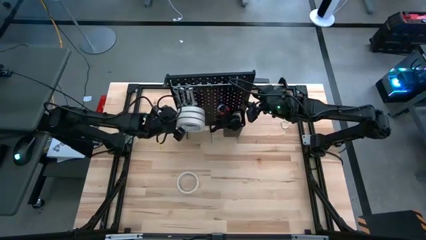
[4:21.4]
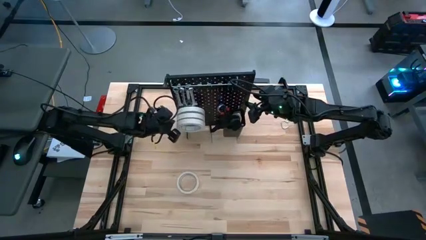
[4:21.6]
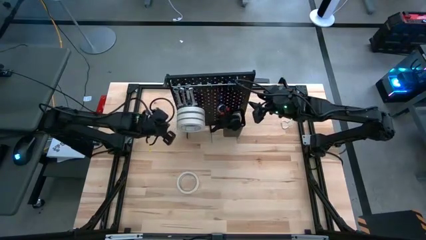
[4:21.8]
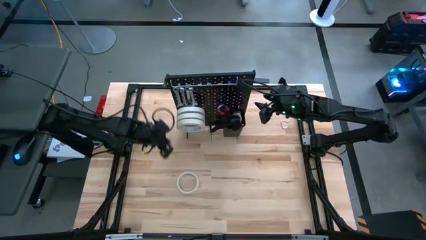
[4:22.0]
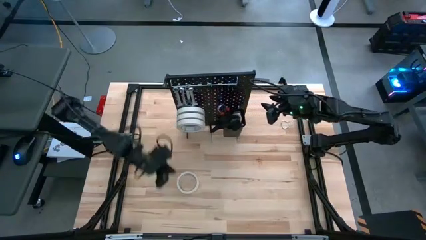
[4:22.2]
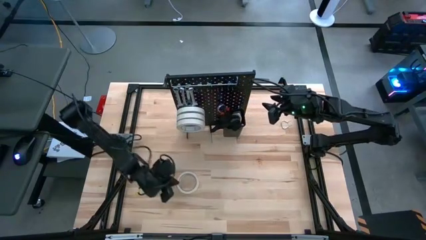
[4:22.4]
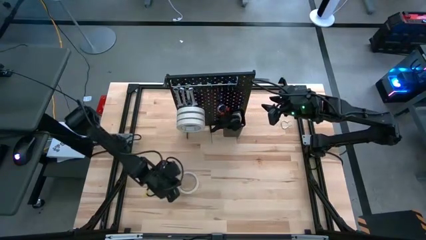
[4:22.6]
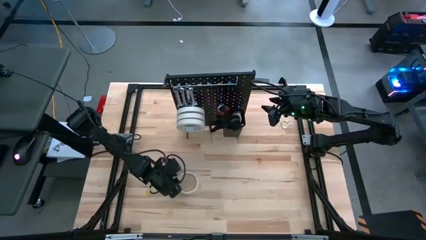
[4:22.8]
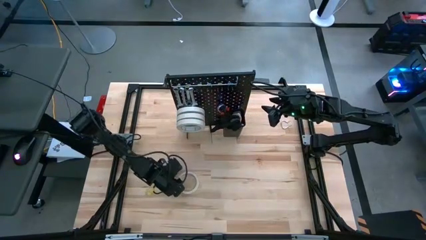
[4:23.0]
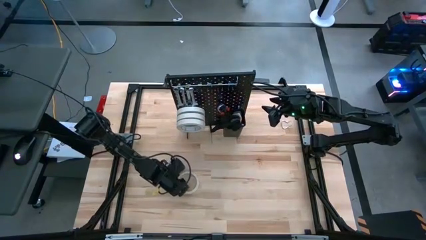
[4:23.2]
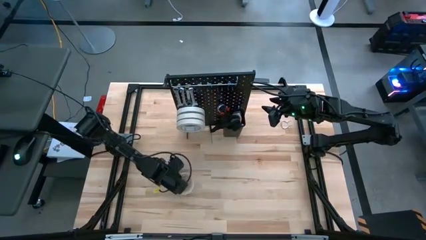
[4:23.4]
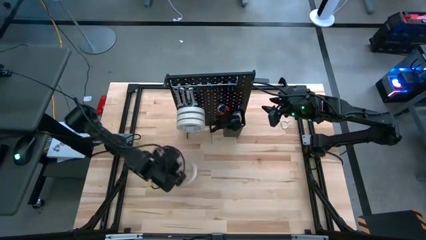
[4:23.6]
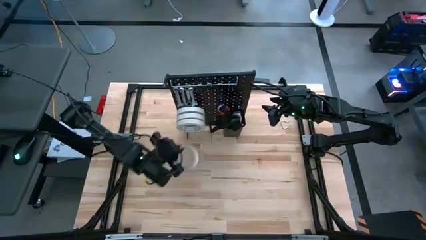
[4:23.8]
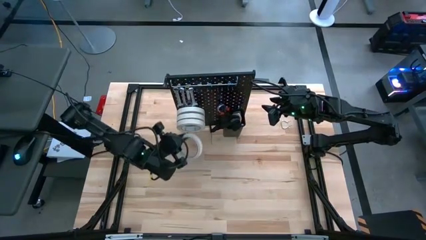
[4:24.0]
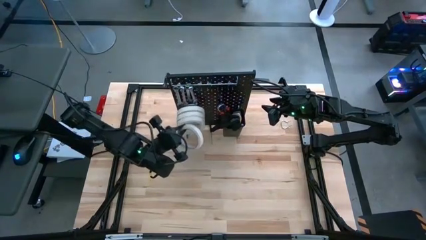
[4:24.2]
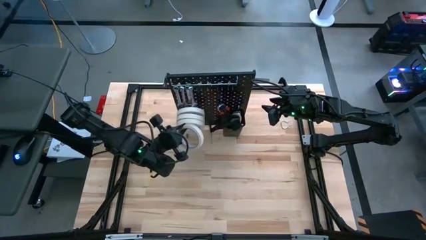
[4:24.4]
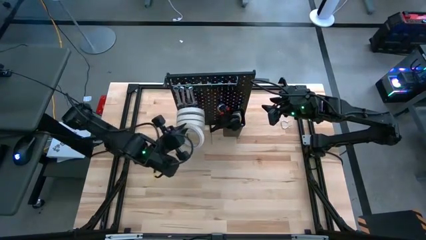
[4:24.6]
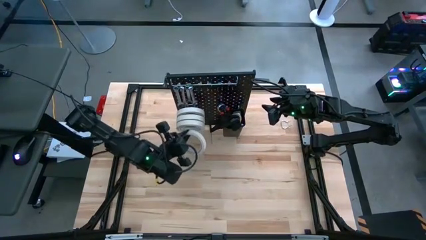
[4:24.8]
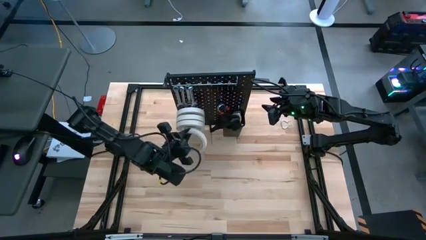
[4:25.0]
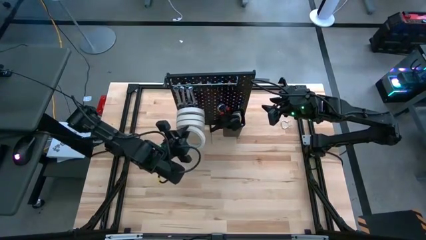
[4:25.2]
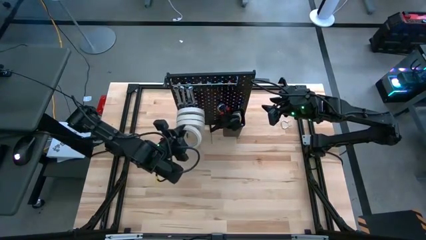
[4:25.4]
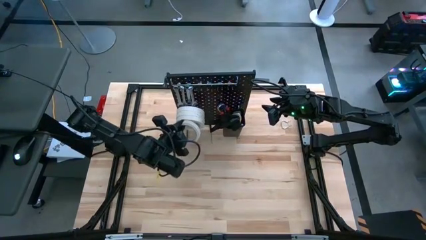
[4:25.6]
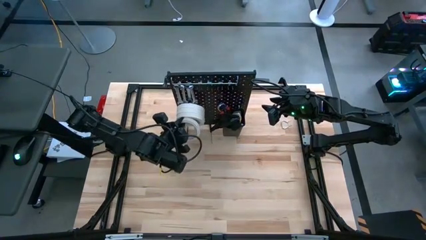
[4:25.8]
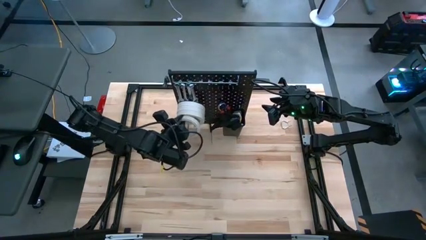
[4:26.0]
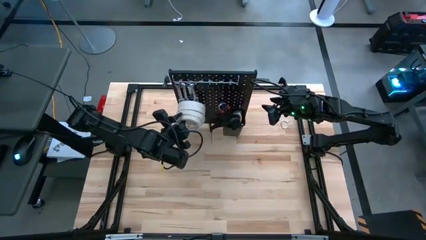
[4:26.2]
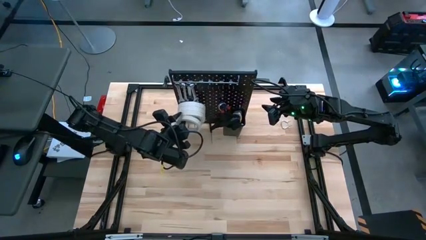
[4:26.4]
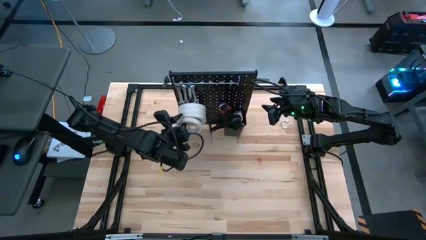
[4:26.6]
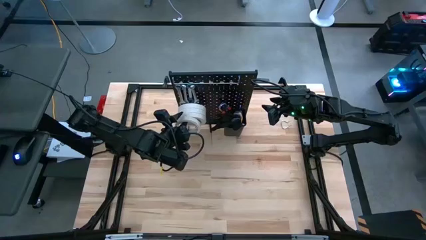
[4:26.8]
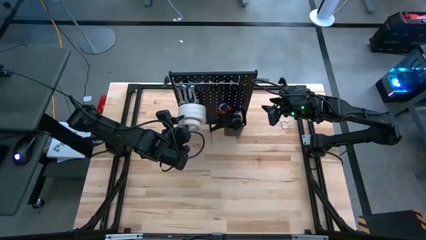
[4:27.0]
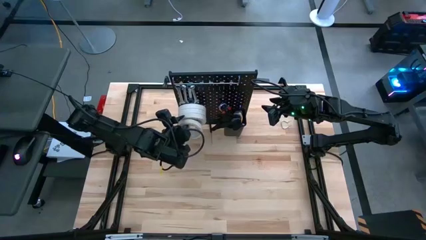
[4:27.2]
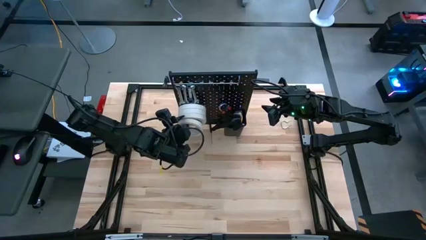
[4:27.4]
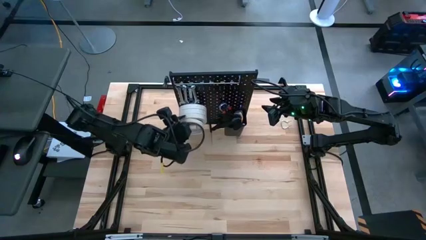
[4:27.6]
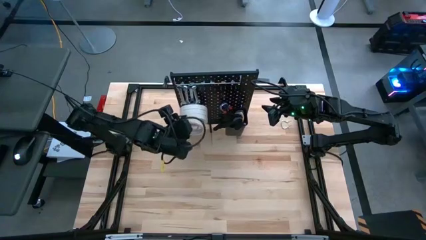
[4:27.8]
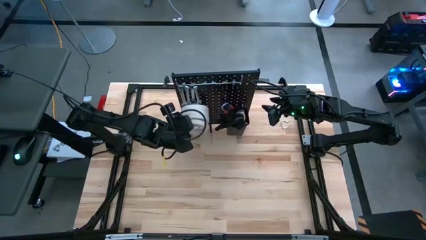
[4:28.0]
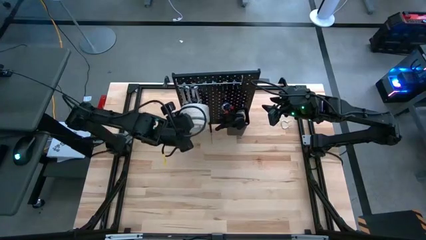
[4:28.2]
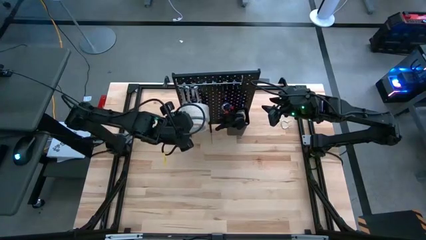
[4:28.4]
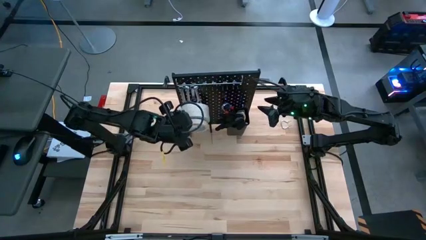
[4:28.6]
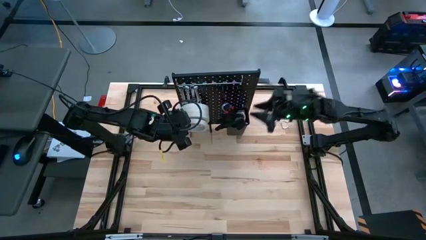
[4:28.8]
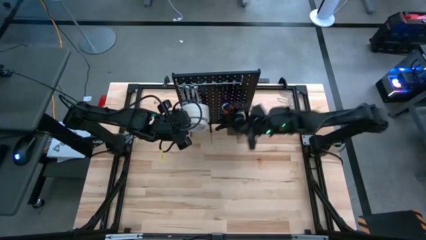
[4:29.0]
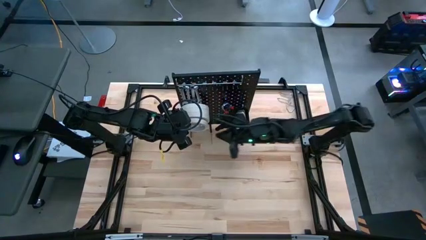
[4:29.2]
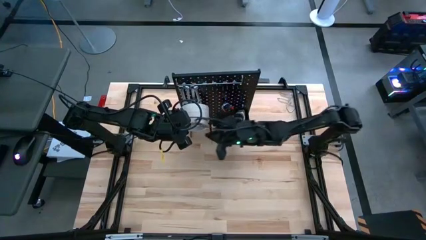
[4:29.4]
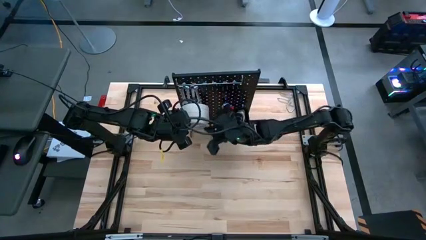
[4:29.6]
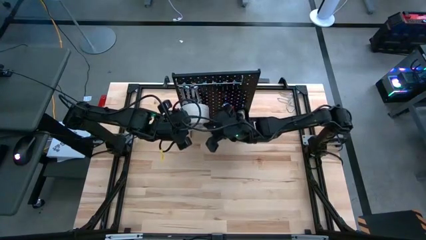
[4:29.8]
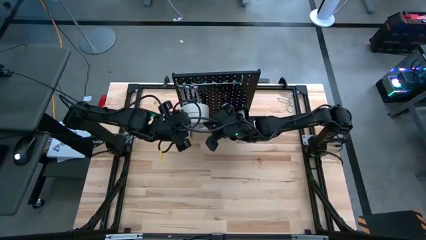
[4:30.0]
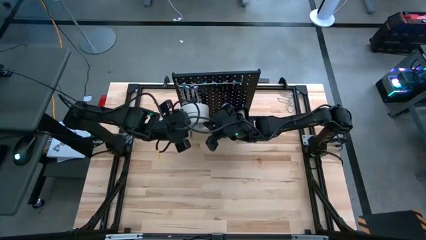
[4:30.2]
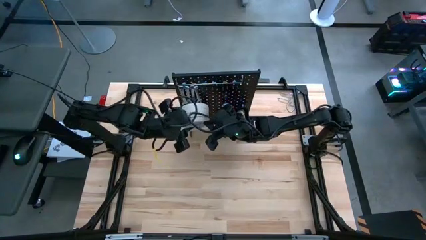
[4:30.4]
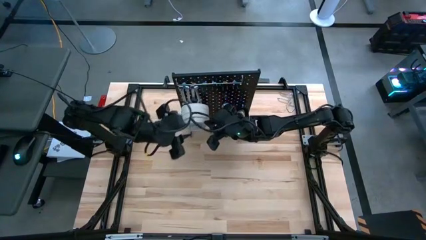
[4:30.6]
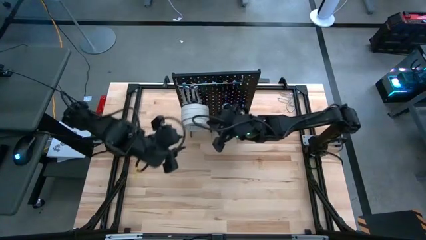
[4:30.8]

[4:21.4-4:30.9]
Task: Hang tools onto peg board
Hang the masking tape onto the pegboard
